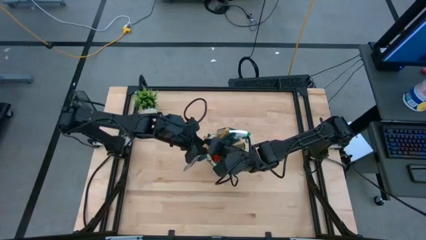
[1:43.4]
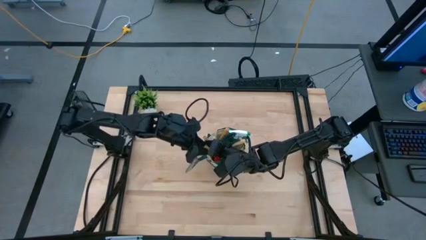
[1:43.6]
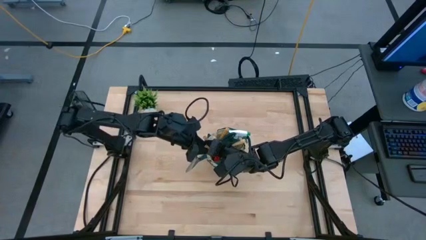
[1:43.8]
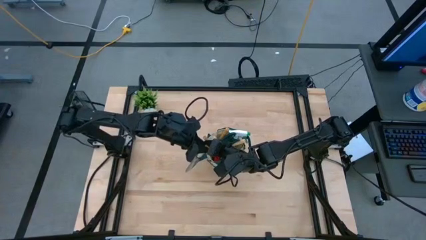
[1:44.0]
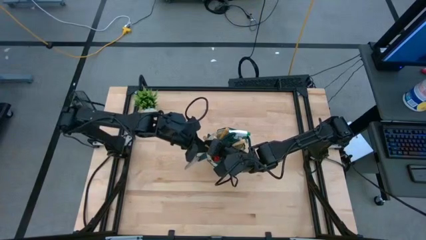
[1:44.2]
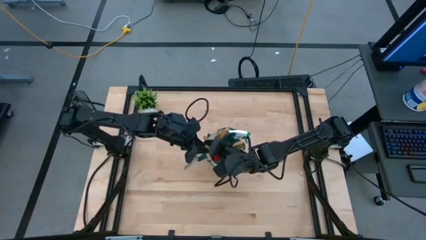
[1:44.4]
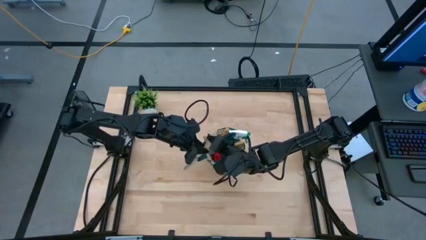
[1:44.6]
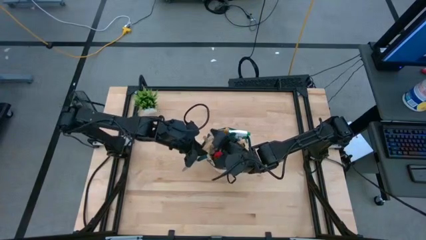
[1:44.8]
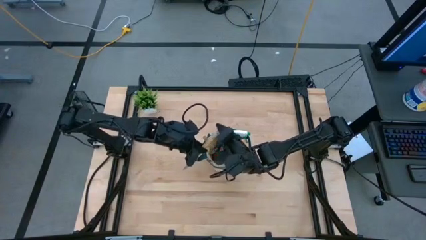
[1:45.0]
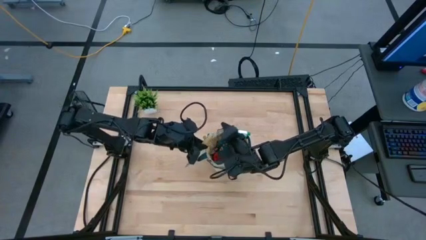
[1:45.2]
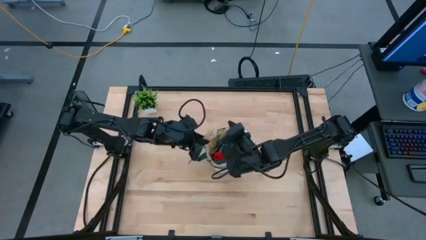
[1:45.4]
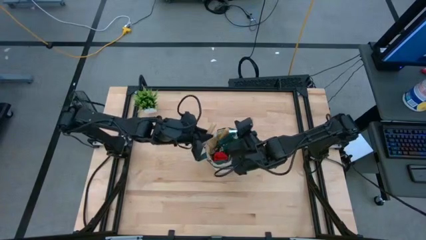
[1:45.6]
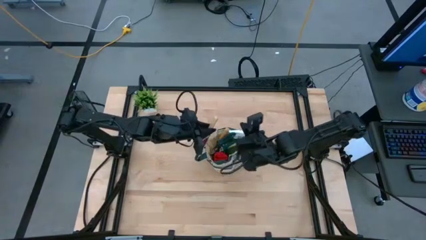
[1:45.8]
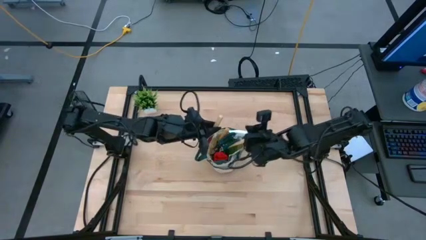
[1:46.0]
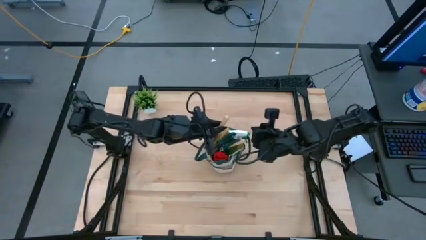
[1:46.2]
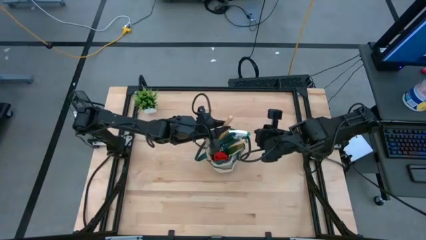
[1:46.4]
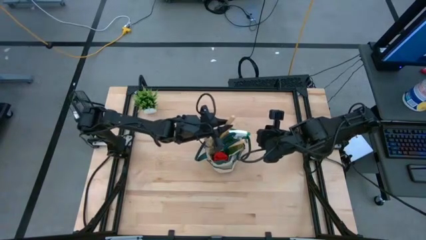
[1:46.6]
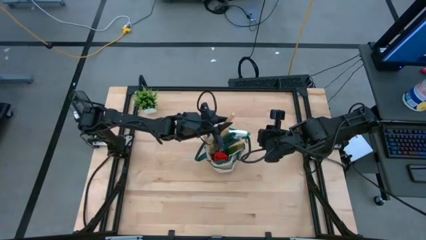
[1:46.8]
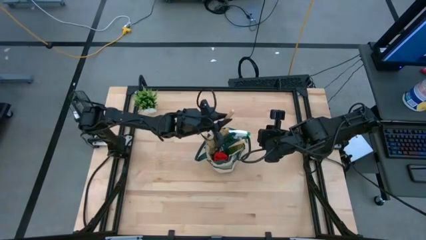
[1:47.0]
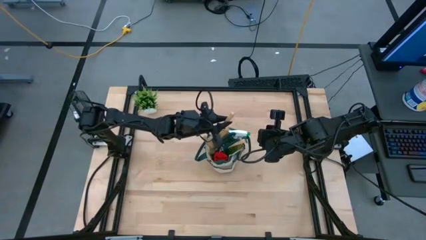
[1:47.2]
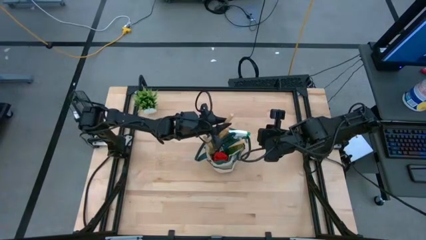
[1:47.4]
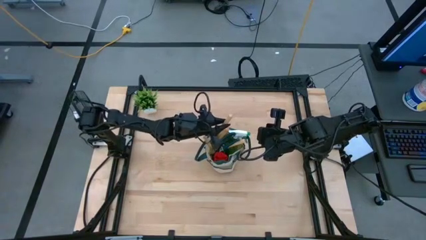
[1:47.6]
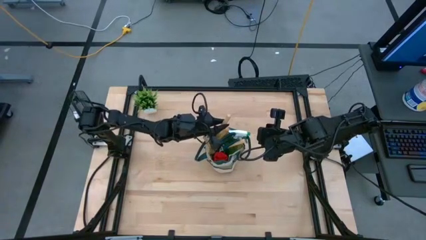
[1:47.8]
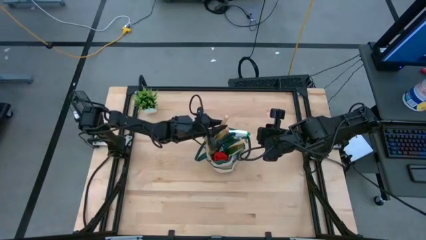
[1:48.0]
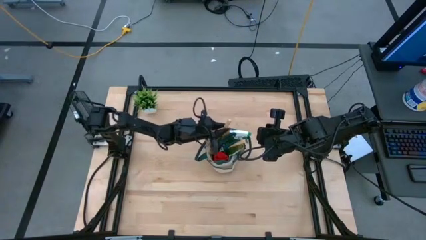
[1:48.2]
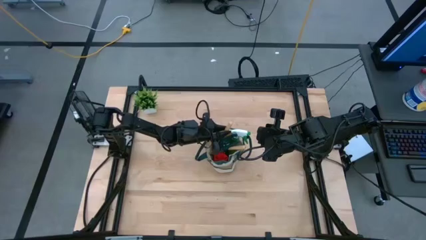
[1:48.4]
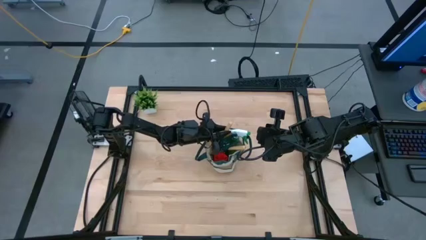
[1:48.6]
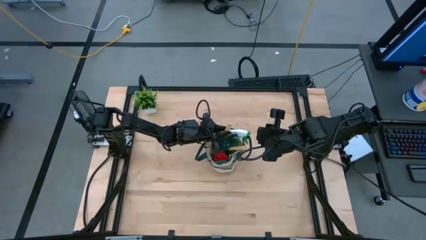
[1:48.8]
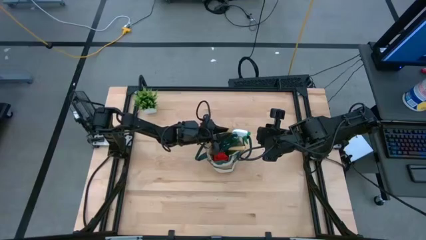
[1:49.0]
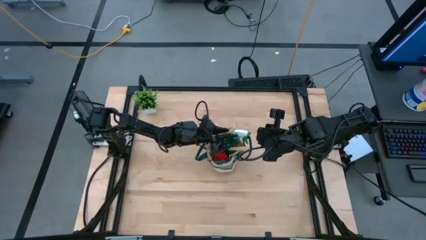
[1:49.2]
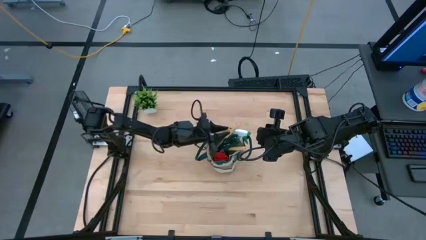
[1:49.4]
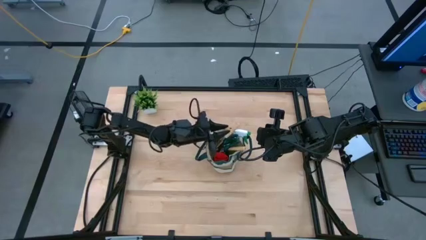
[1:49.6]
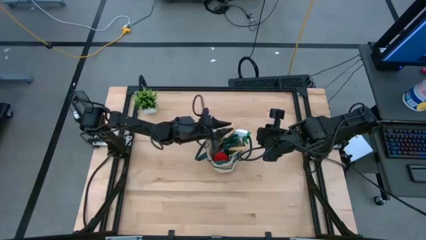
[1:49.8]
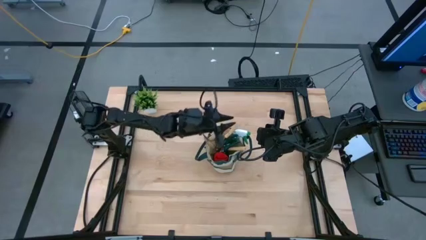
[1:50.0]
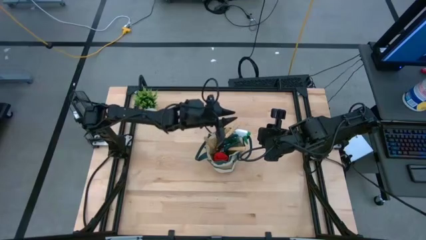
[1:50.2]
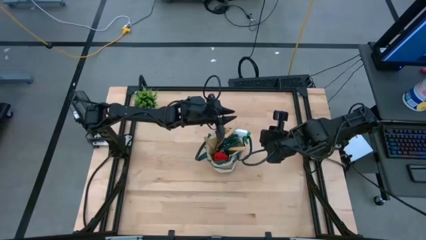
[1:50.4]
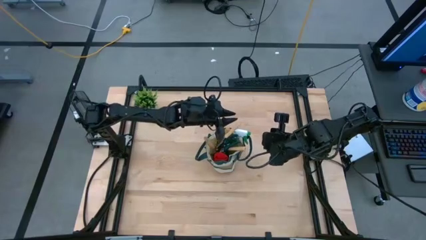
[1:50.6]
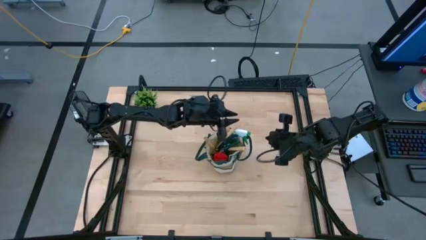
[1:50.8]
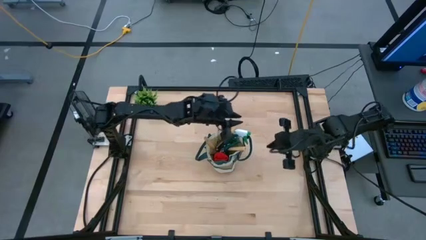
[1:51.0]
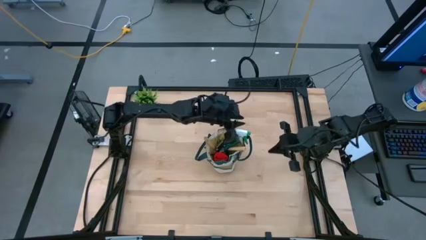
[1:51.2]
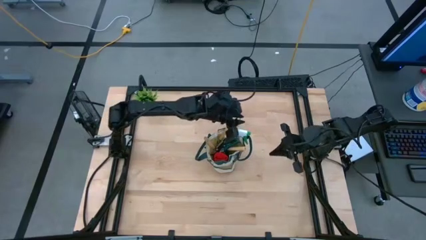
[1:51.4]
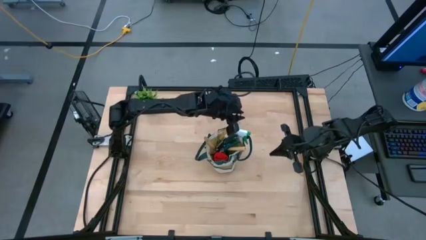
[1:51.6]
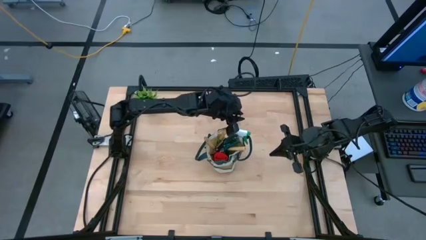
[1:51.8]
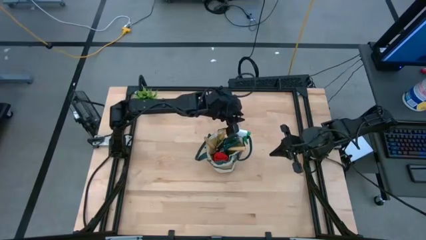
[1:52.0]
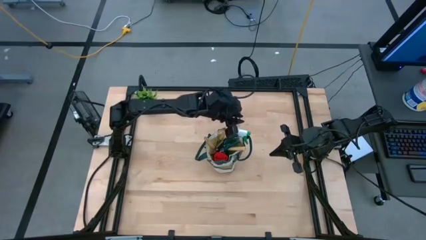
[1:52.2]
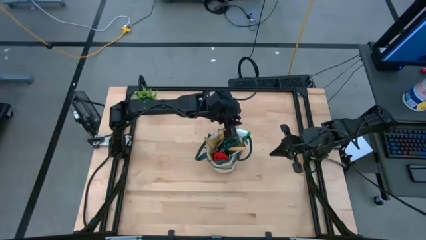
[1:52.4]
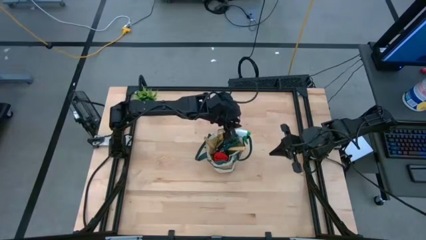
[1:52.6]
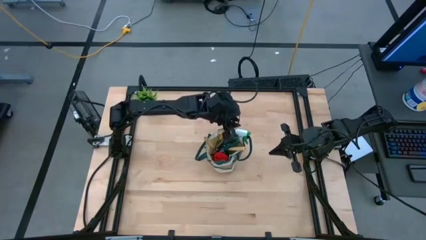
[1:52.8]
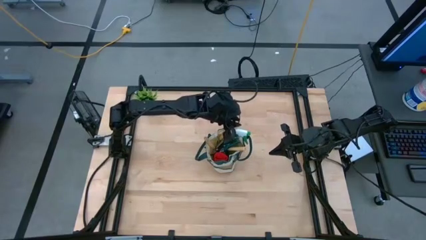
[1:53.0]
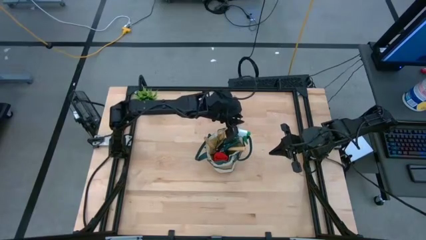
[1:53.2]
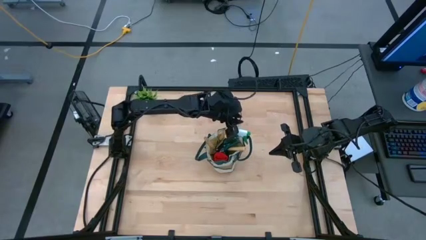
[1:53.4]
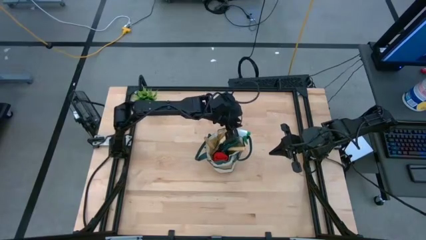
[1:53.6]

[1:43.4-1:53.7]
Task: Pick & Place Garden tools in Gardening bag
Put the light brown trowel into the light brown gardening bag

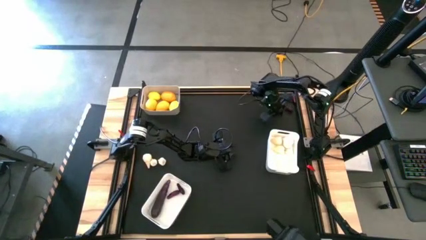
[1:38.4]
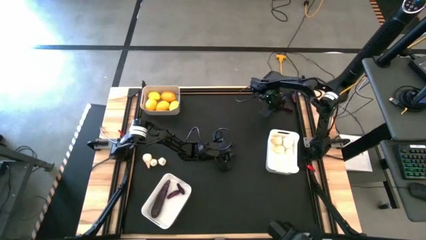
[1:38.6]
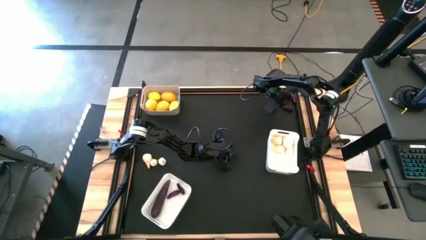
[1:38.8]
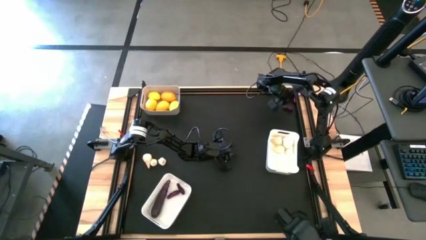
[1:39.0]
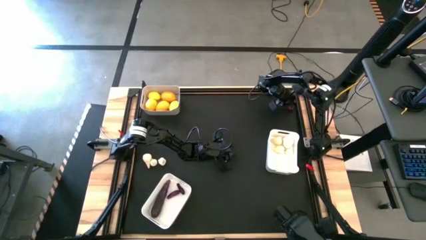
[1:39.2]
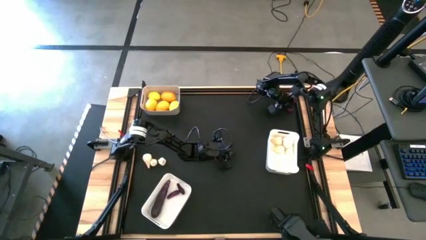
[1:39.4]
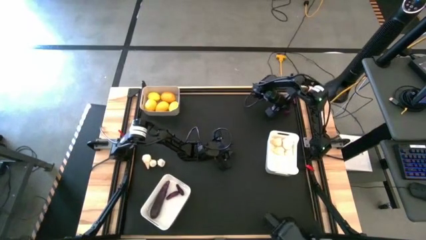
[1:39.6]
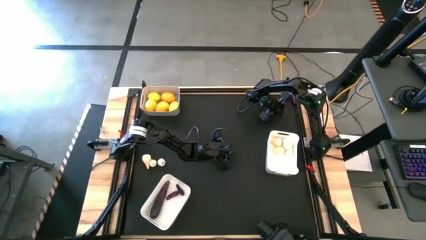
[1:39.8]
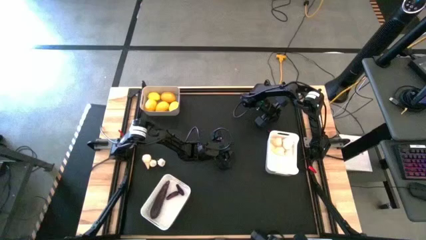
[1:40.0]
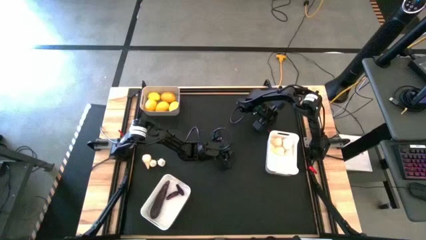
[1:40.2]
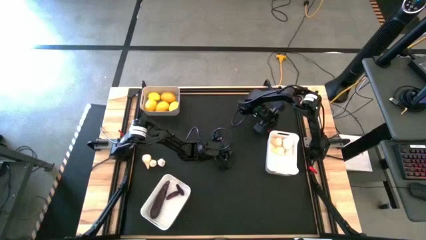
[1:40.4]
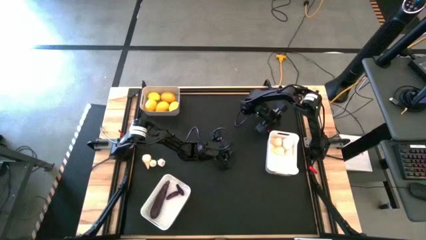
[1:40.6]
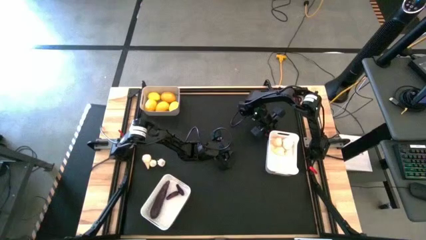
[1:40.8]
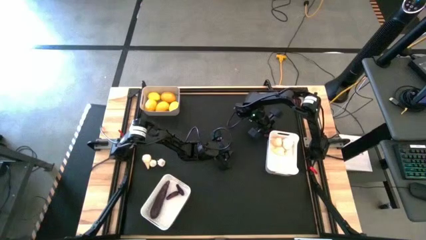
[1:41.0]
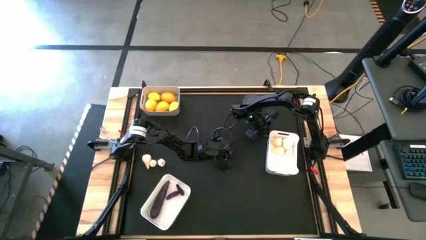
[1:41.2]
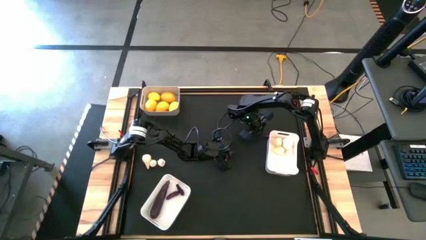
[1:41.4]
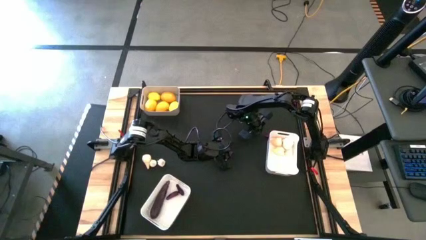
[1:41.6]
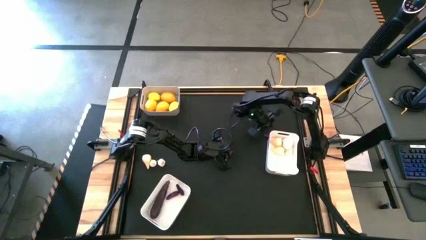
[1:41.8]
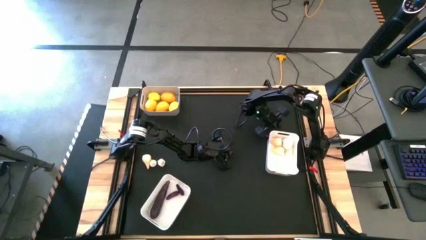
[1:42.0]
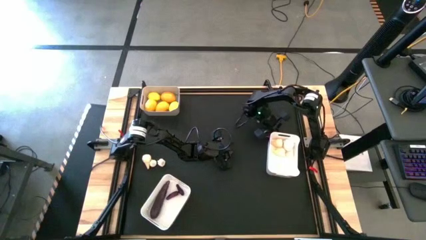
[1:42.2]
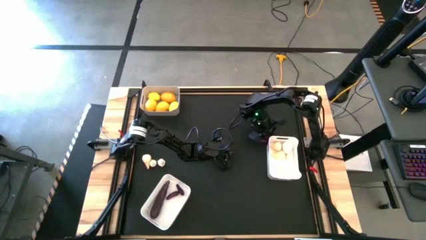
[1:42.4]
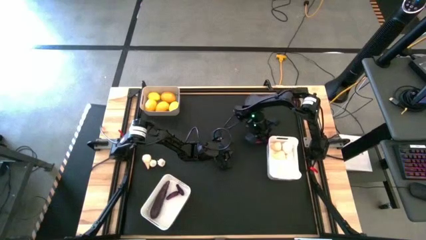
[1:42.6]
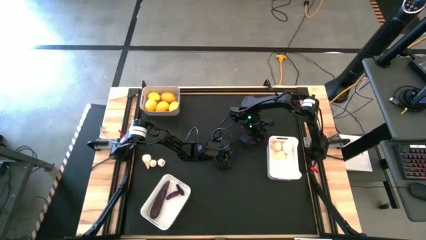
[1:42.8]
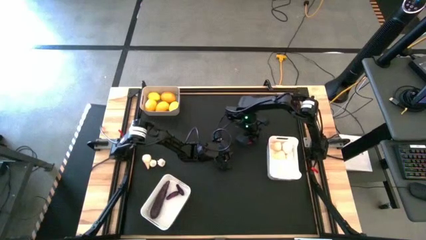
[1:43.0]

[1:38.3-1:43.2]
Task: Sort produce into baskets
Move the bottom eggplant to the center on the table
